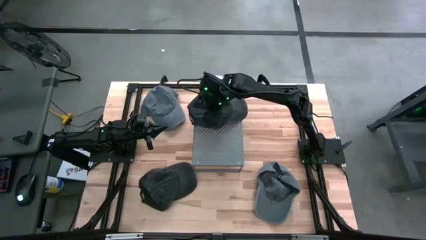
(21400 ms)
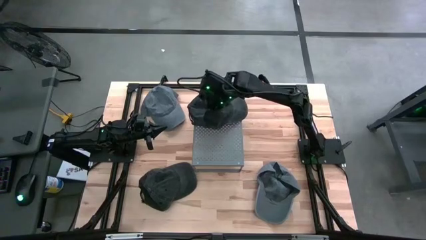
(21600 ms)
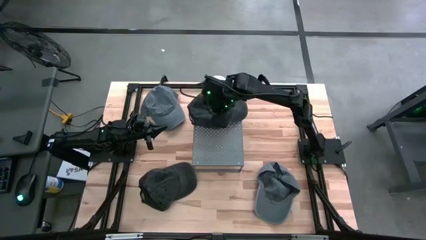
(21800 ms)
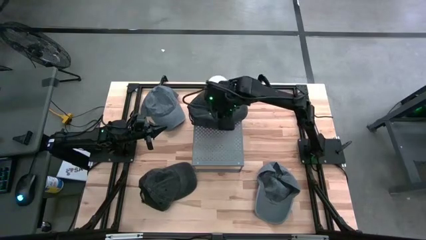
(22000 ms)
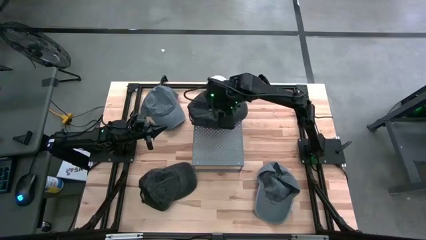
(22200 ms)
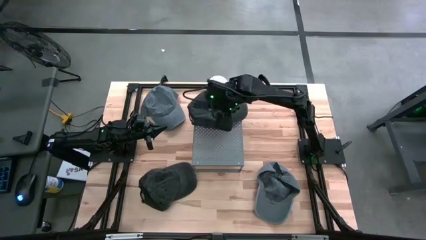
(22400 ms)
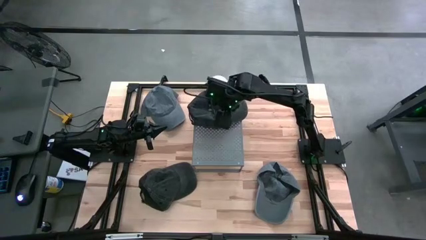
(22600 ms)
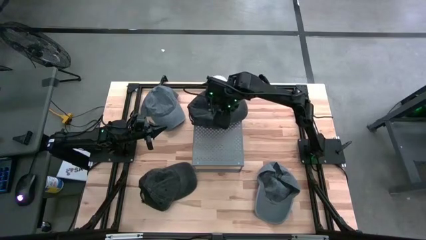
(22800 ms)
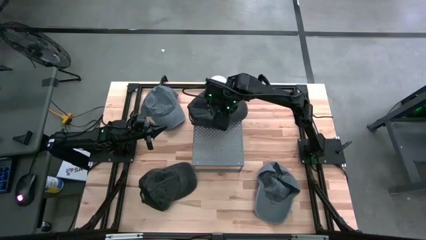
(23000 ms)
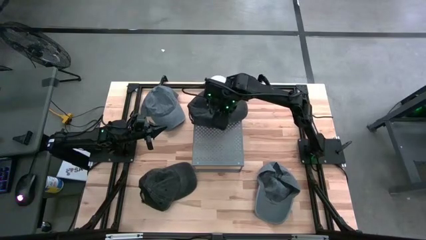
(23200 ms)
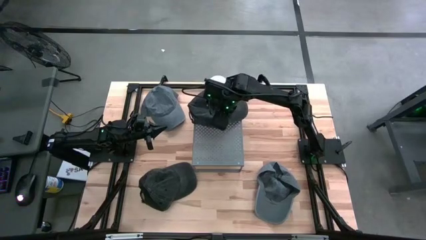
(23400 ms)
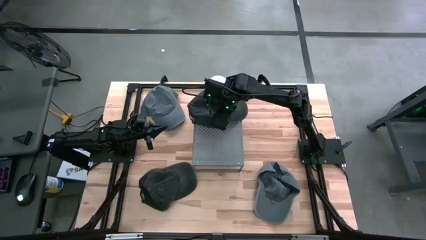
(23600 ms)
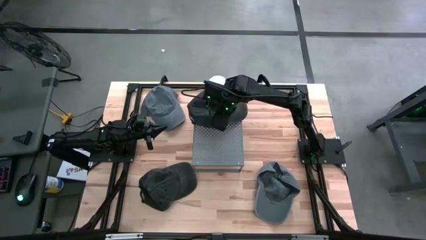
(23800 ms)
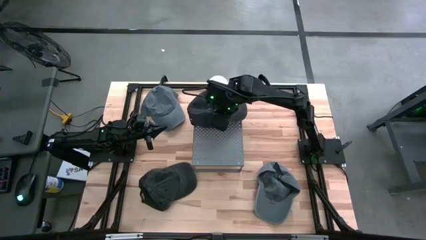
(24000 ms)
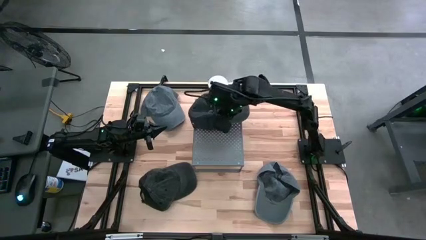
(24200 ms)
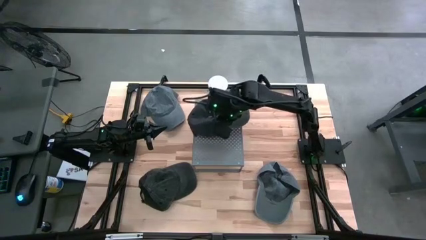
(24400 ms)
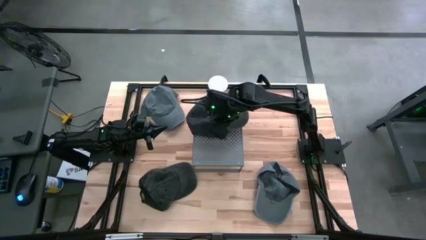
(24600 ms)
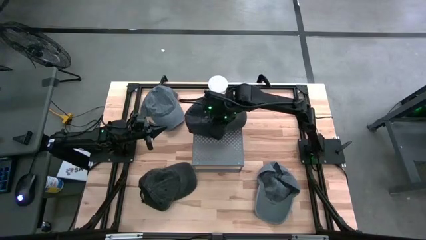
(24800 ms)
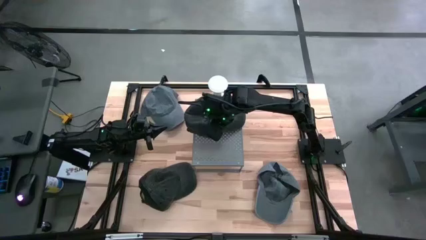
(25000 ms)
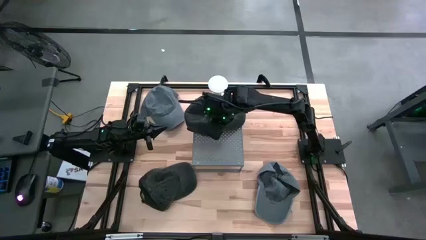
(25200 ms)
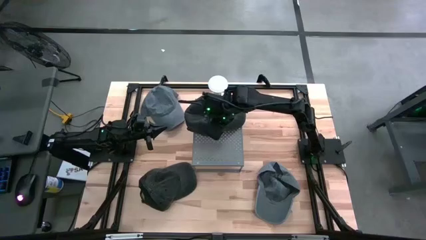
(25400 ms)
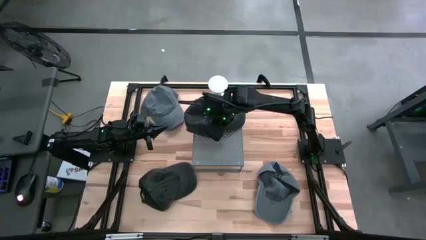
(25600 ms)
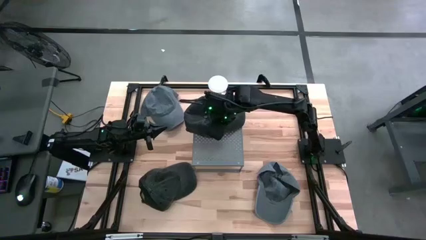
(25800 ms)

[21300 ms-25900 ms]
Task: Pick & Place hat
Put the top black cap on the shelf

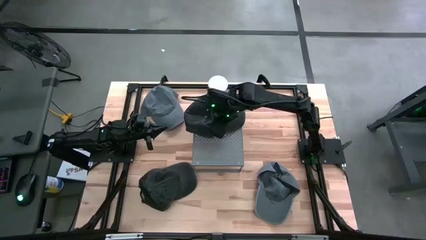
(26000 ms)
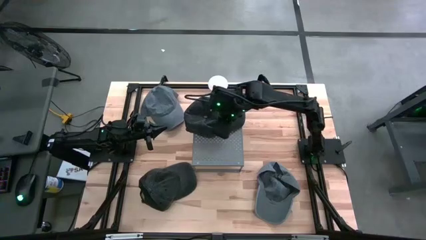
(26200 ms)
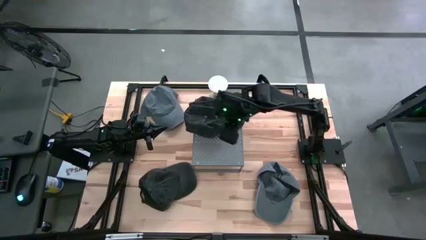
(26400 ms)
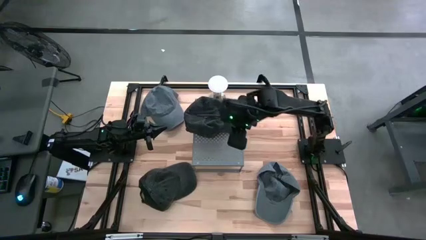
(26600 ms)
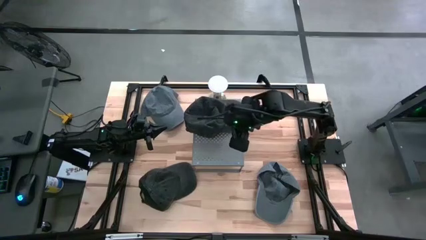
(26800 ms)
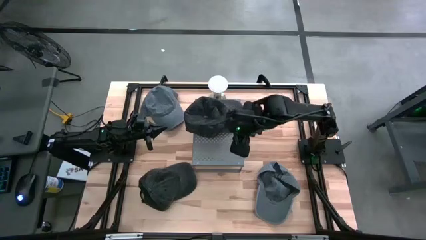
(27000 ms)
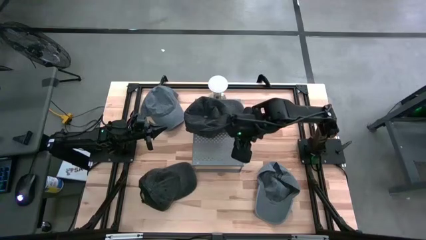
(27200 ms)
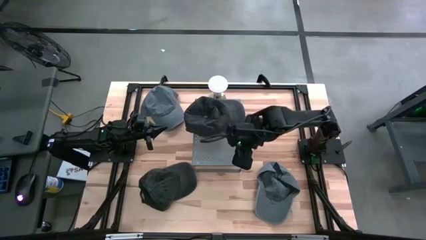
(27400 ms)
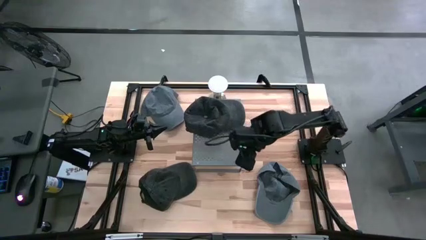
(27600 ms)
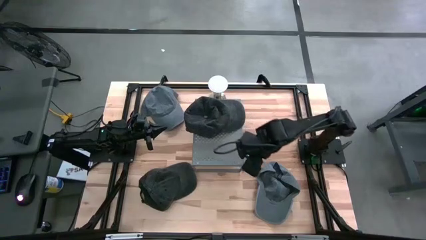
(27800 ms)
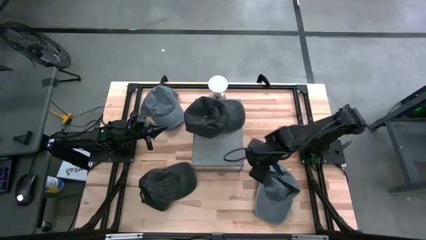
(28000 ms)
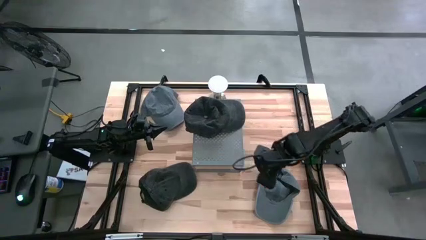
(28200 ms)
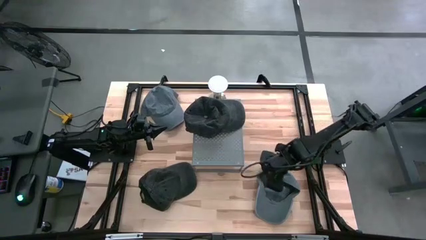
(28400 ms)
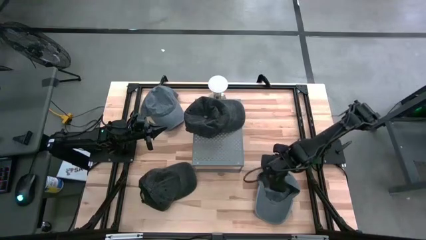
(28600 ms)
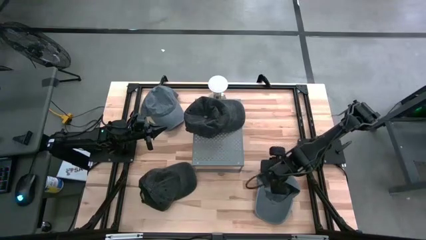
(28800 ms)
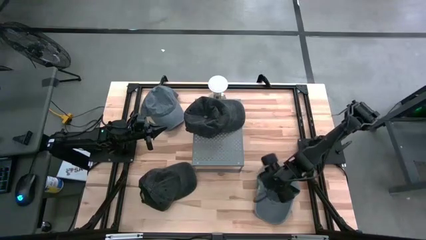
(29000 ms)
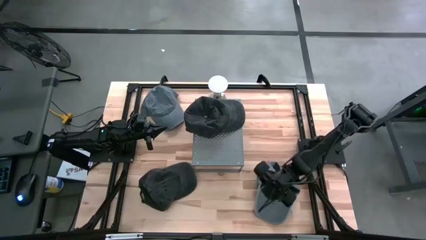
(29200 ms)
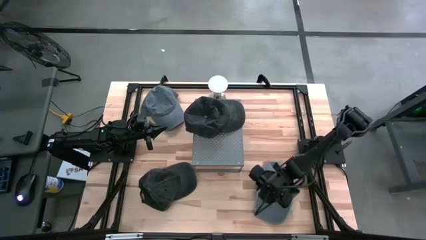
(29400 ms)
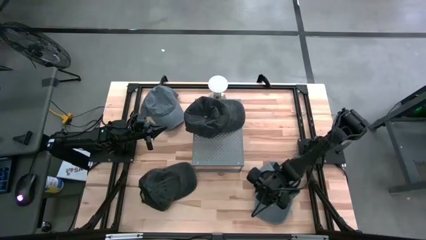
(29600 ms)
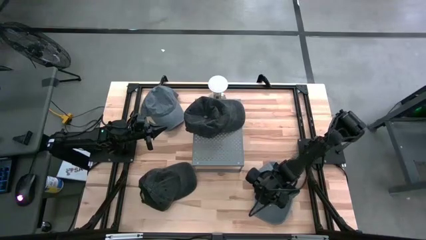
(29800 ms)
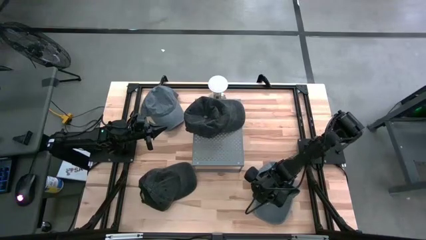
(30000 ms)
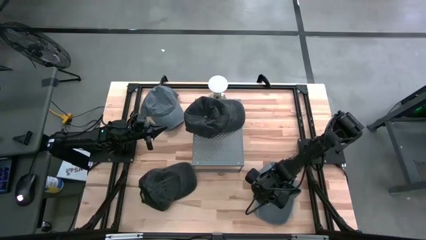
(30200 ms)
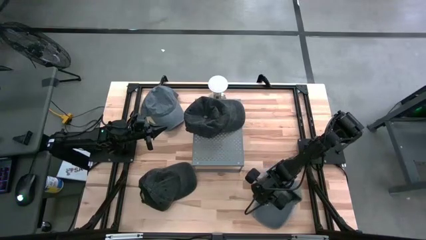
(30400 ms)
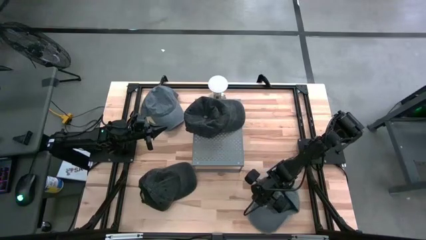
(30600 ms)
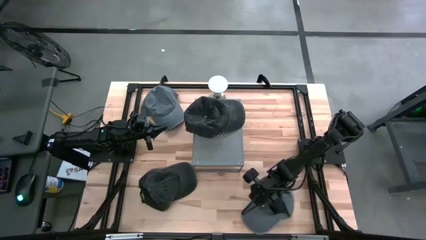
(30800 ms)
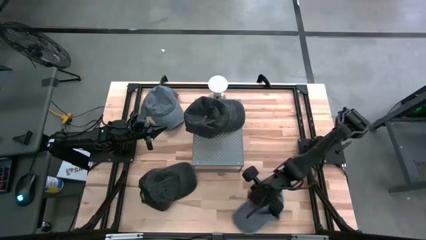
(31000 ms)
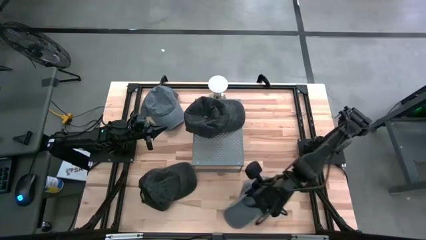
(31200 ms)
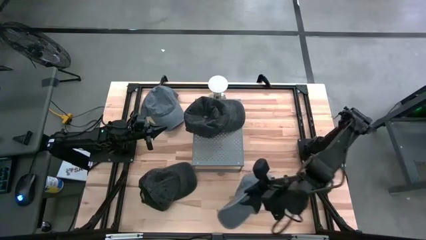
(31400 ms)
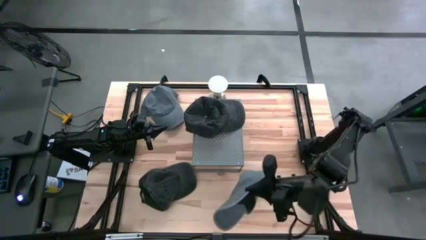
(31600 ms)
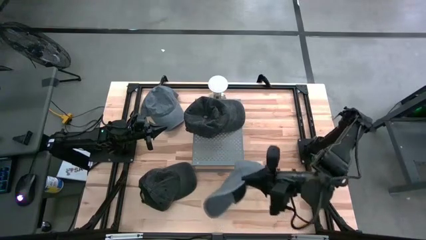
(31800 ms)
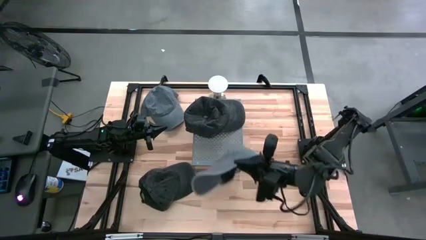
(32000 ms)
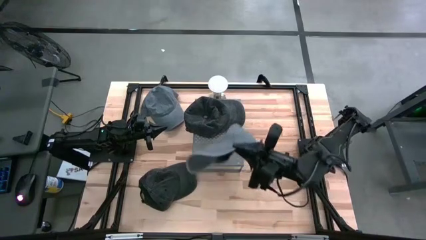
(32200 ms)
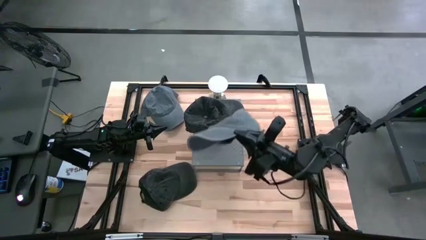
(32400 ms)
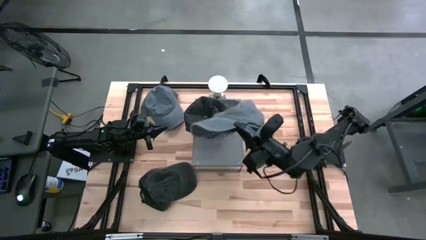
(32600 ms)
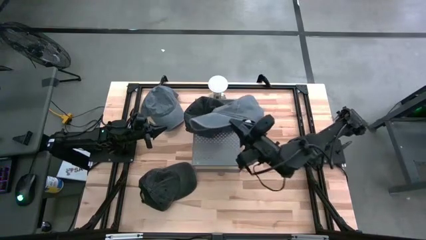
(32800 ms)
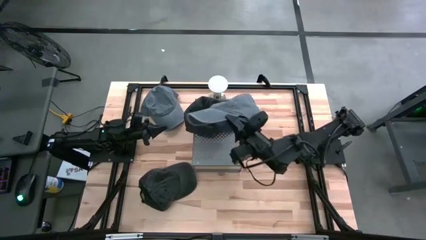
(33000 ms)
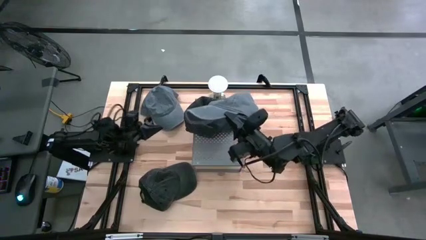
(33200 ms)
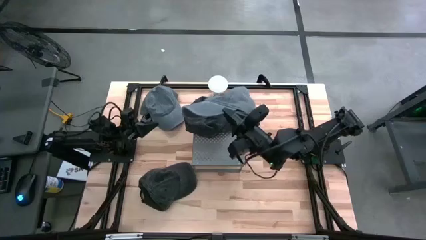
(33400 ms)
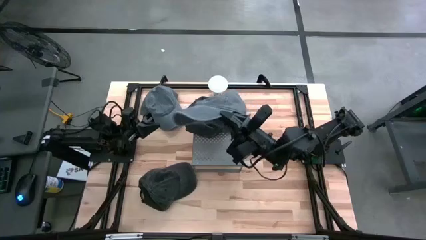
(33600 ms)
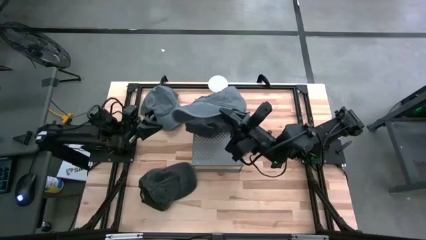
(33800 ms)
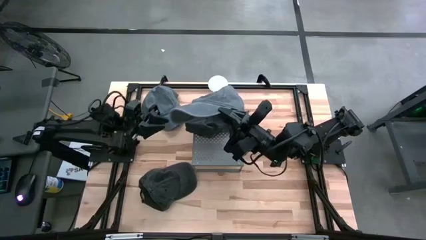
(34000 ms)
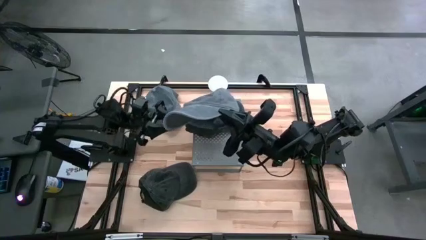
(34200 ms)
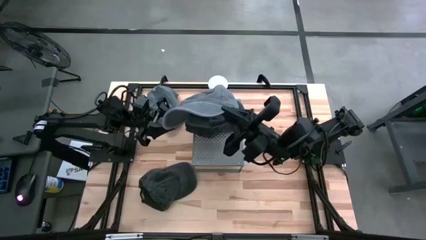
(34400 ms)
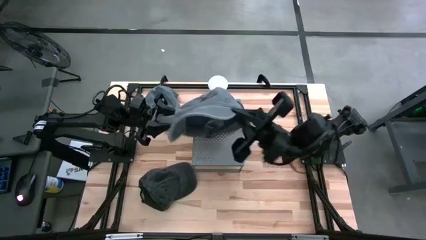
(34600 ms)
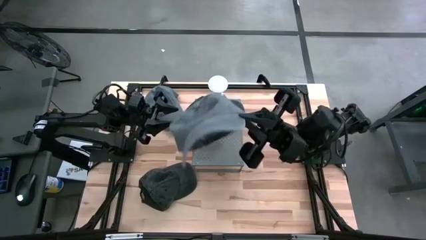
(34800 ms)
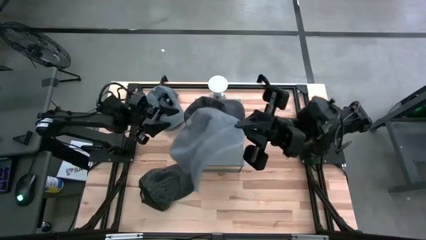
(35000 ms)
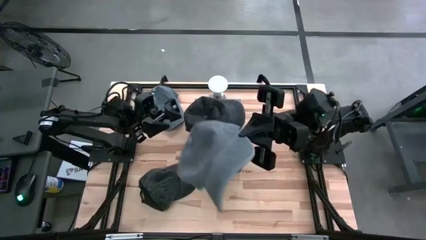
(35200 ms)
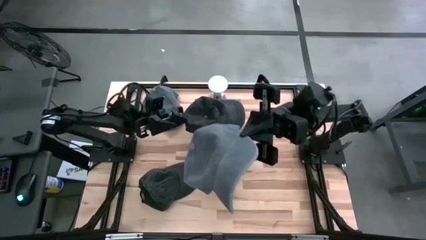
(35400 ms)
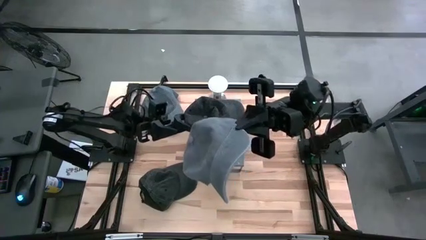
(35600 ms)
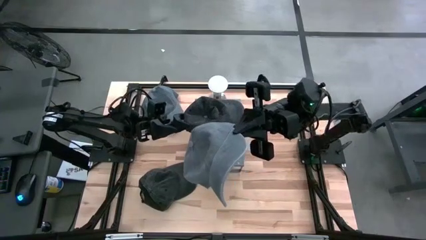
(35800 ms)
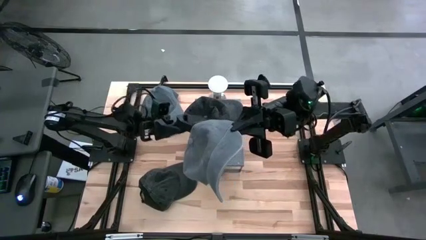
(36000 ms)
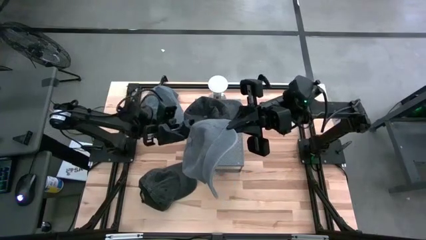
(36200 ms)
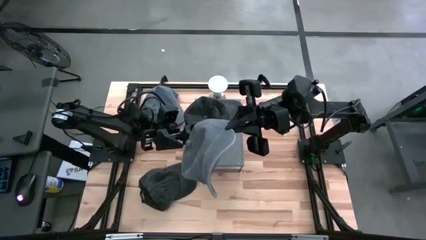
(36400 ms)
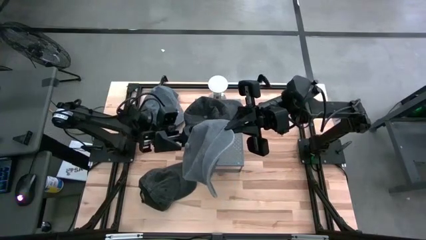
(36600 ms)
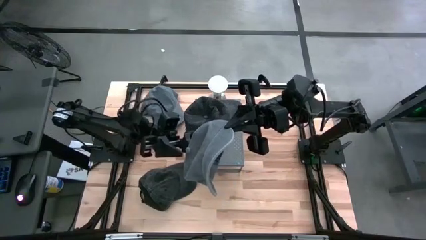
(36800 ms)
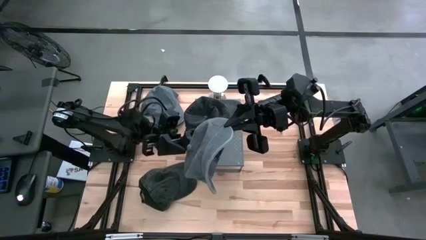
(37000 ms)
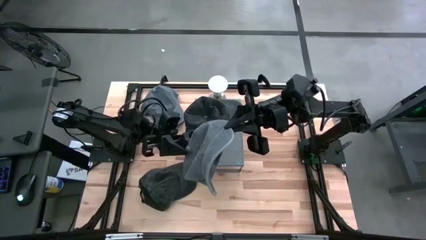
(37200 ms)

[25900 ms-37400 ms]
Put the bottom gray cap on the shelf

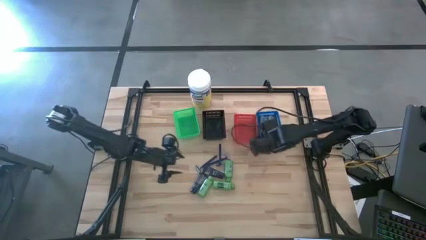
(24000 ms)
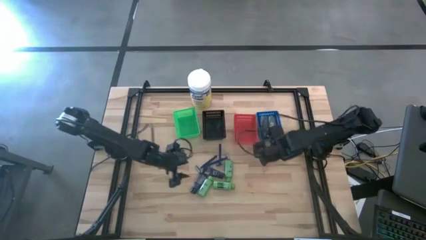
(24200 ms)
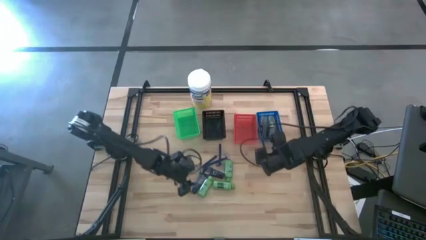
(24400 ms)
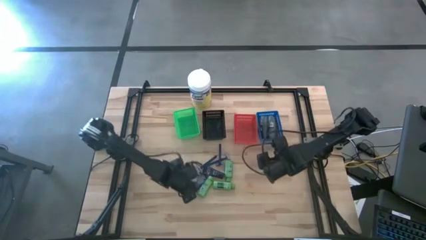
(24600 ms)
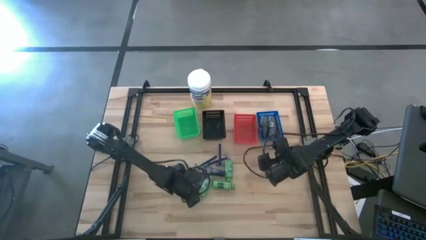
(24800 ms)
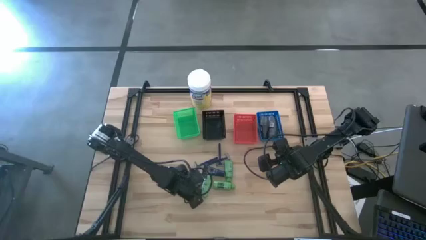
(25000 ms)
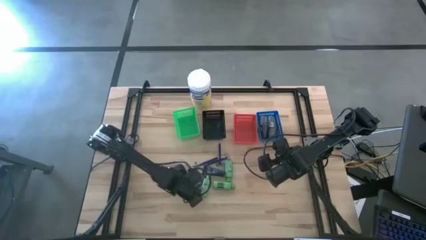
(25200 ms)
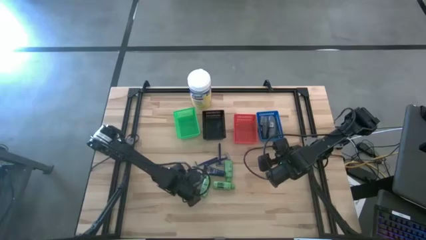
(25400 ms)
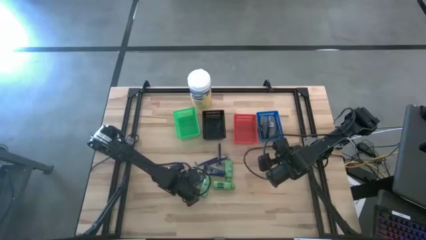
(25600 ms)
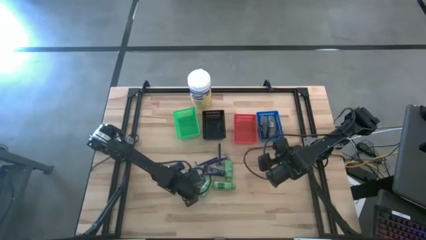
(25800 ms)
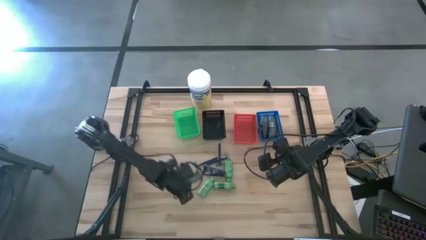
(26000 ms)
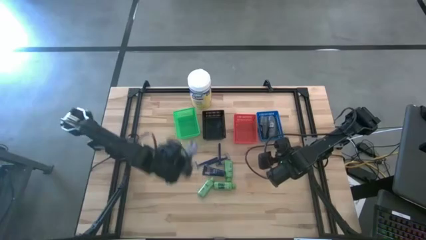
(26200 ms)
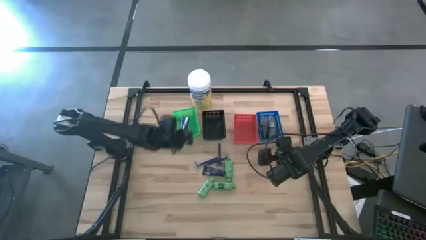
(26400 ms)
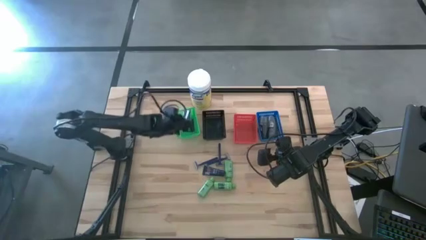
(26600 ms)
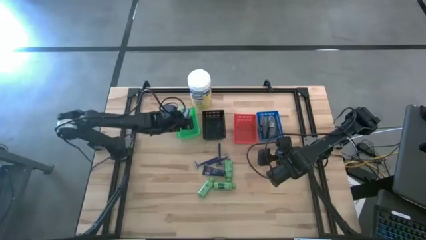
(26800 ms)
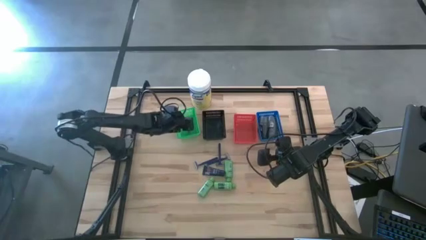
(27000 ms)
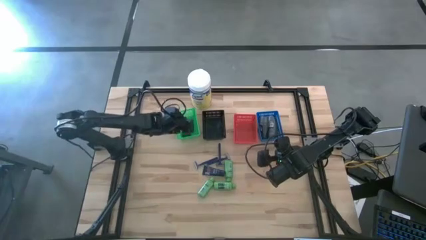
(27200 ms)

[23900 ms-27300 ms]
Task: Pick & Place Travel size toiletries
Put the blue shave cream into the green bin
